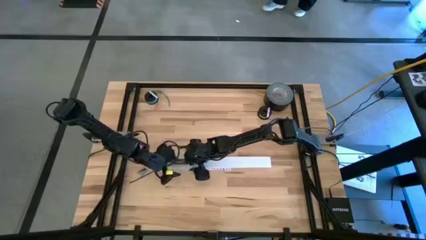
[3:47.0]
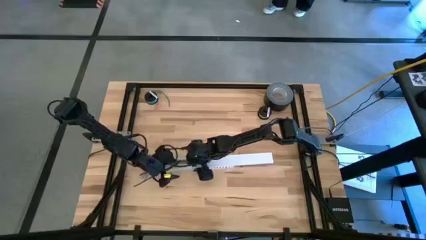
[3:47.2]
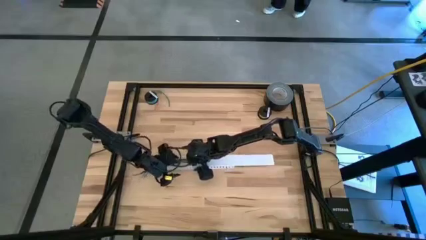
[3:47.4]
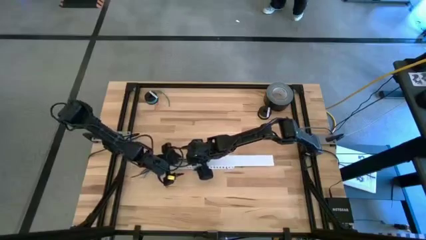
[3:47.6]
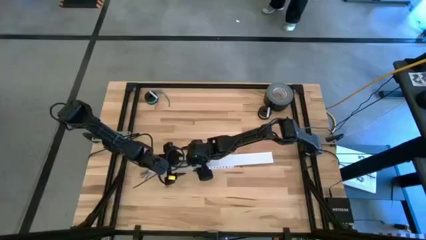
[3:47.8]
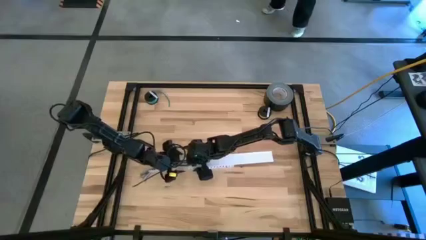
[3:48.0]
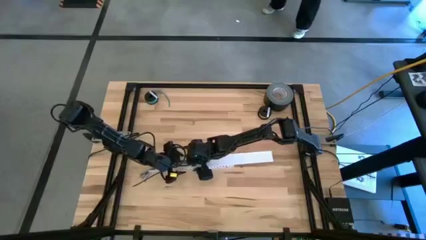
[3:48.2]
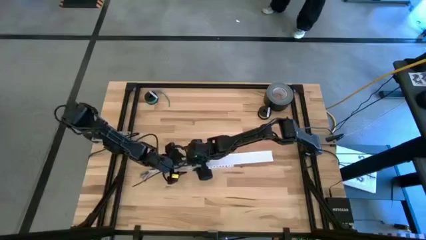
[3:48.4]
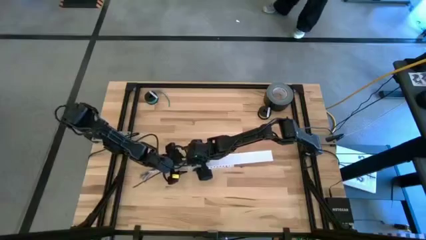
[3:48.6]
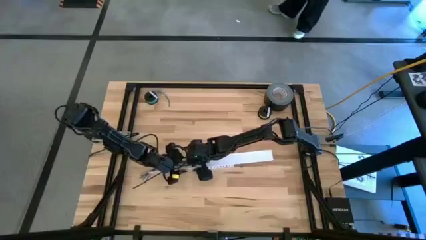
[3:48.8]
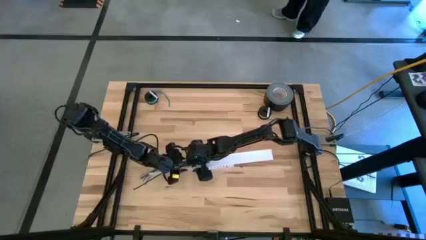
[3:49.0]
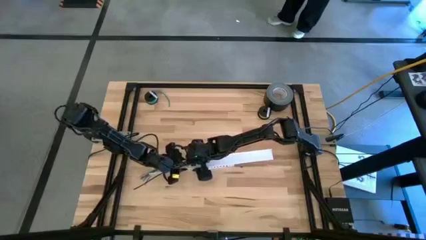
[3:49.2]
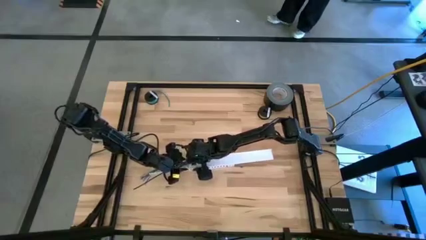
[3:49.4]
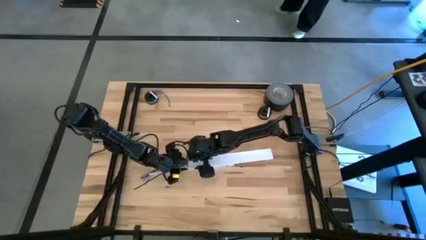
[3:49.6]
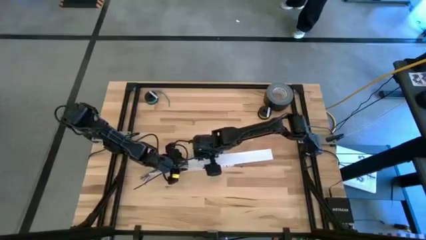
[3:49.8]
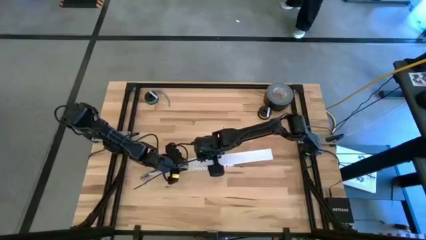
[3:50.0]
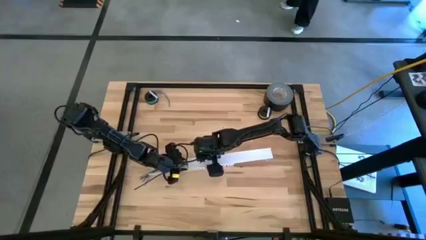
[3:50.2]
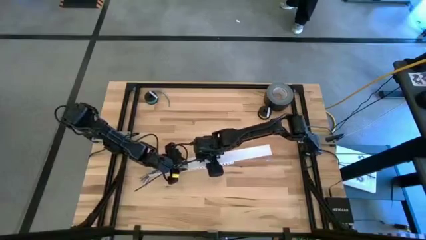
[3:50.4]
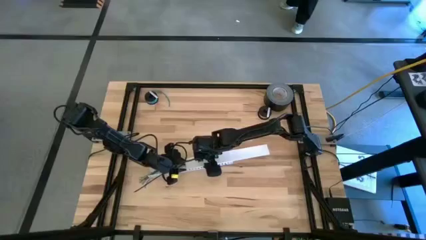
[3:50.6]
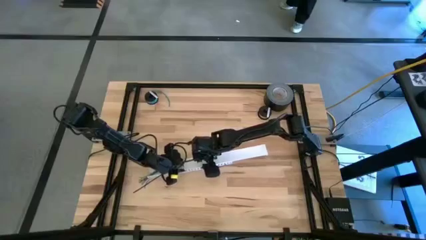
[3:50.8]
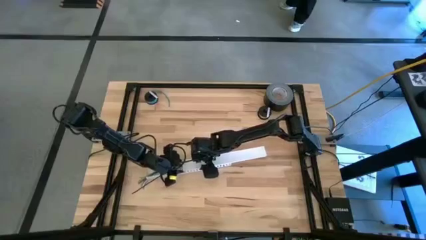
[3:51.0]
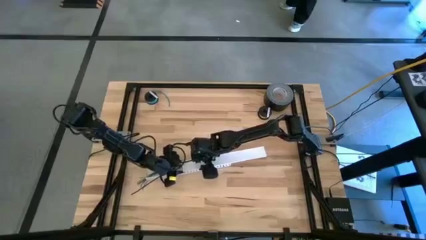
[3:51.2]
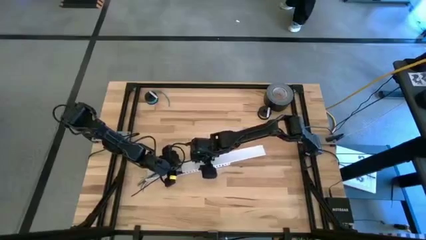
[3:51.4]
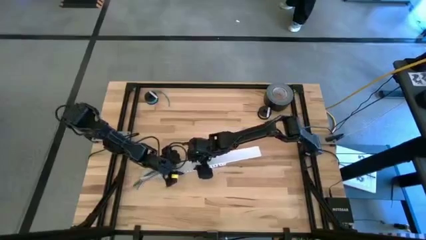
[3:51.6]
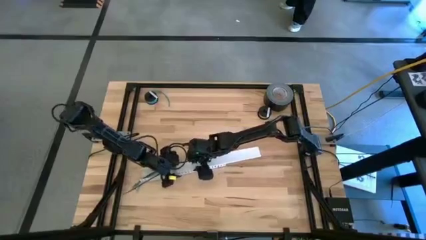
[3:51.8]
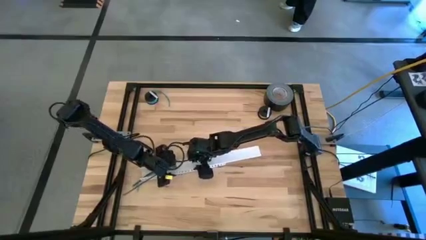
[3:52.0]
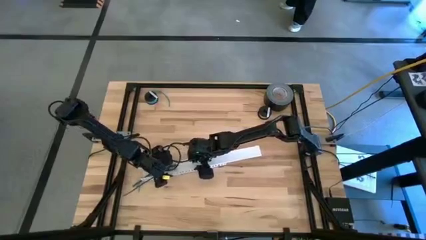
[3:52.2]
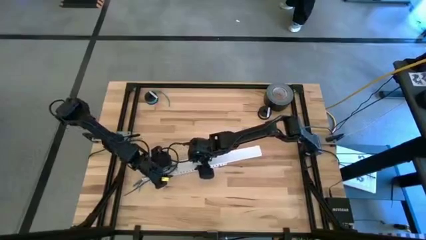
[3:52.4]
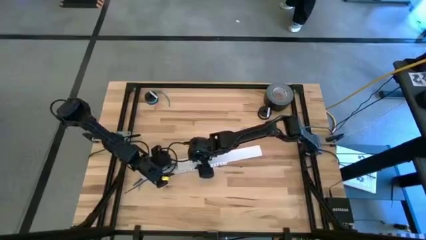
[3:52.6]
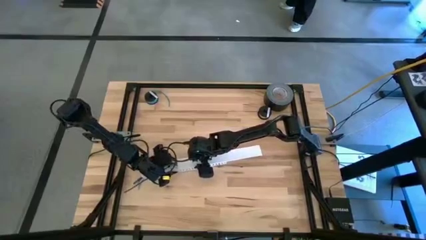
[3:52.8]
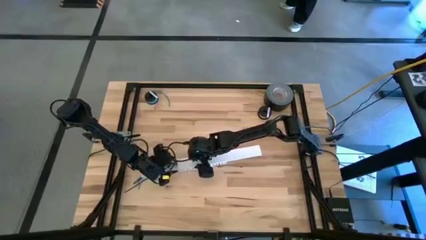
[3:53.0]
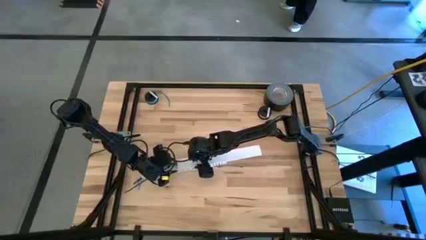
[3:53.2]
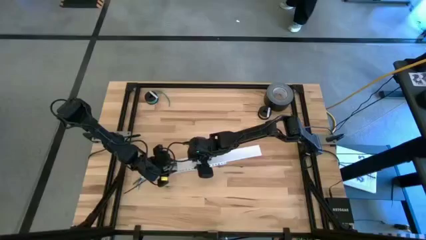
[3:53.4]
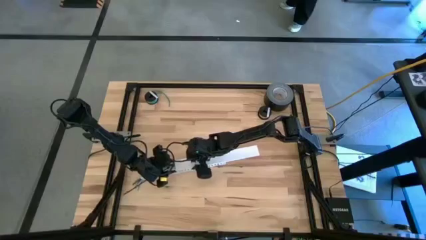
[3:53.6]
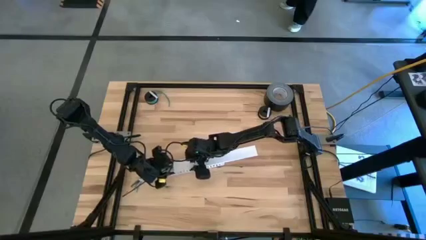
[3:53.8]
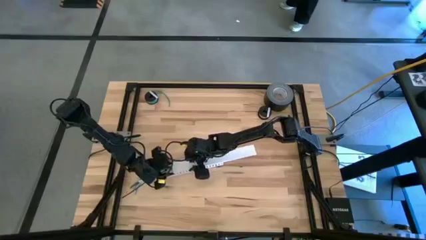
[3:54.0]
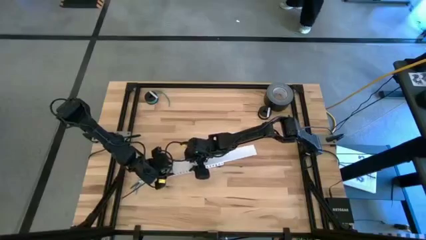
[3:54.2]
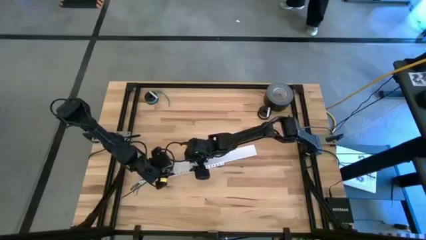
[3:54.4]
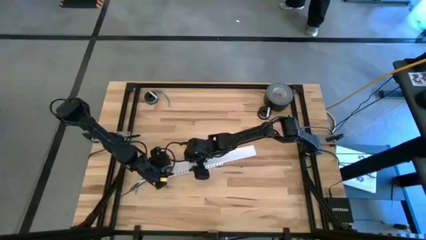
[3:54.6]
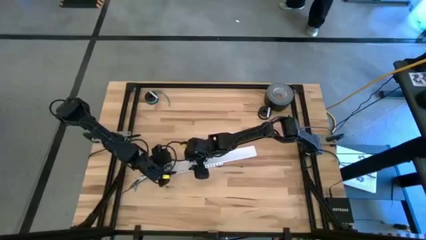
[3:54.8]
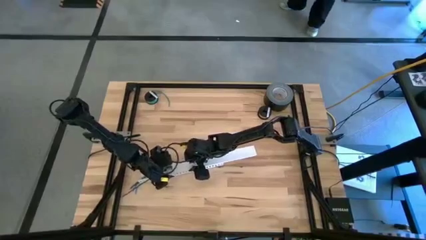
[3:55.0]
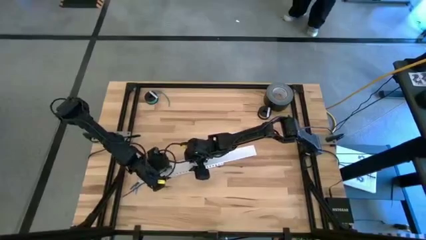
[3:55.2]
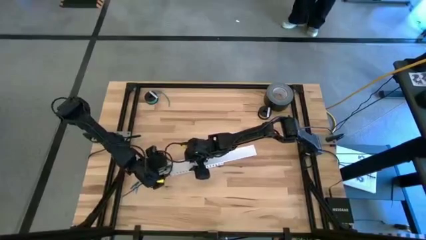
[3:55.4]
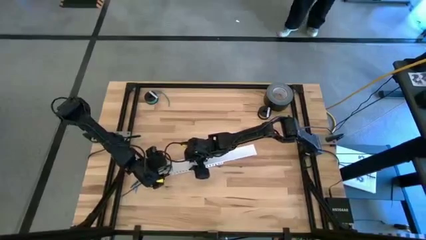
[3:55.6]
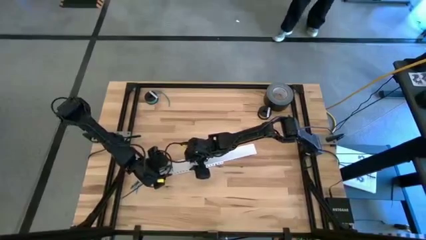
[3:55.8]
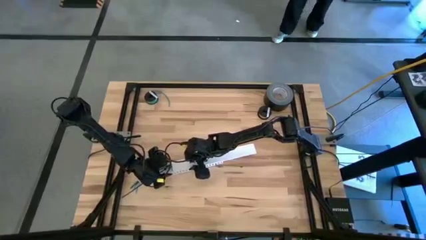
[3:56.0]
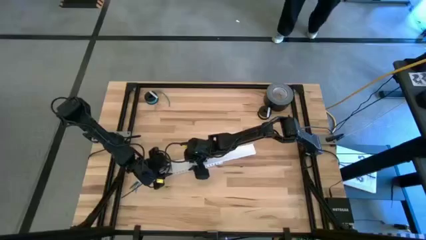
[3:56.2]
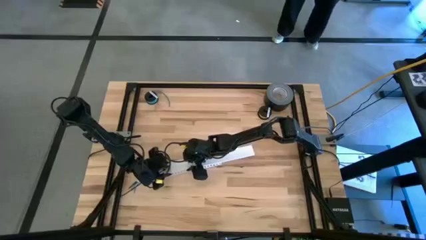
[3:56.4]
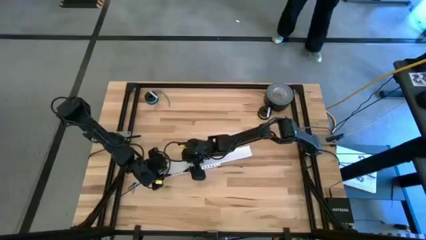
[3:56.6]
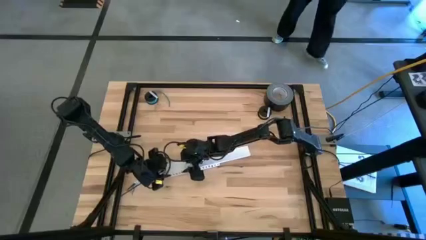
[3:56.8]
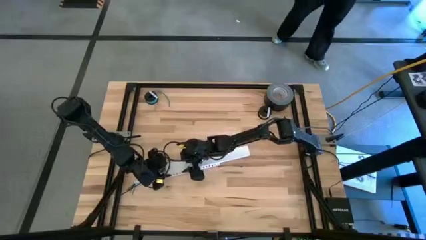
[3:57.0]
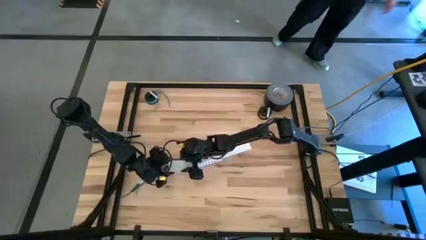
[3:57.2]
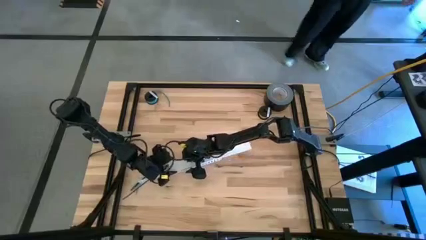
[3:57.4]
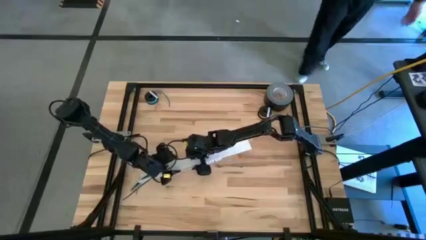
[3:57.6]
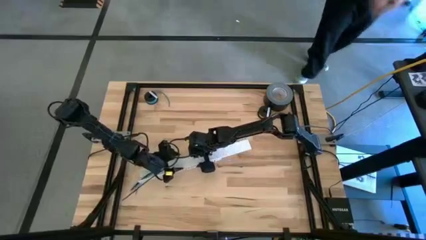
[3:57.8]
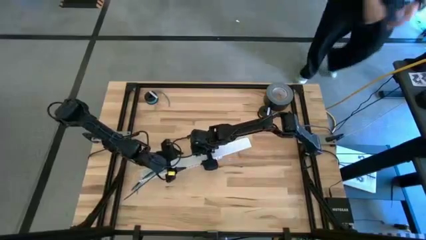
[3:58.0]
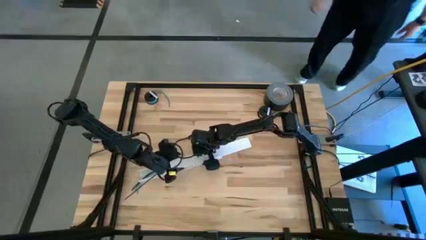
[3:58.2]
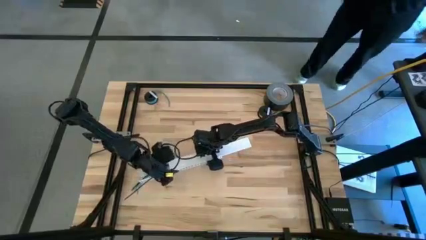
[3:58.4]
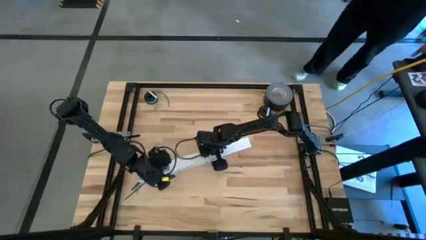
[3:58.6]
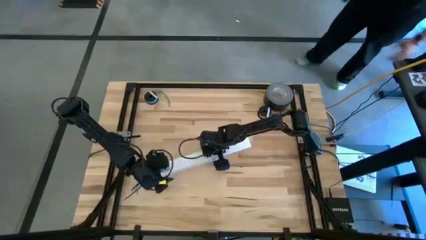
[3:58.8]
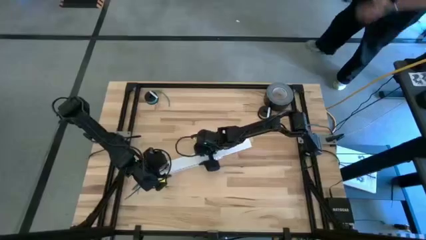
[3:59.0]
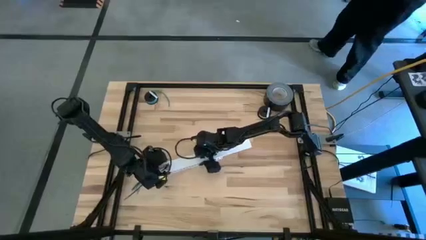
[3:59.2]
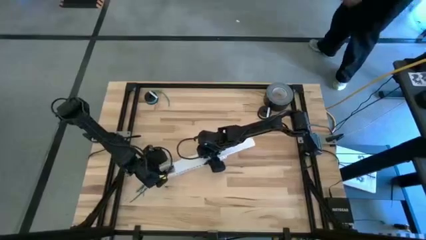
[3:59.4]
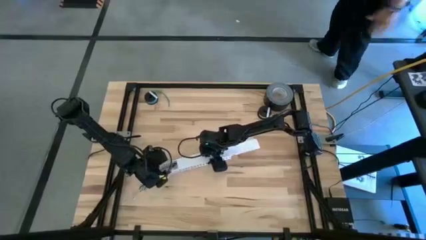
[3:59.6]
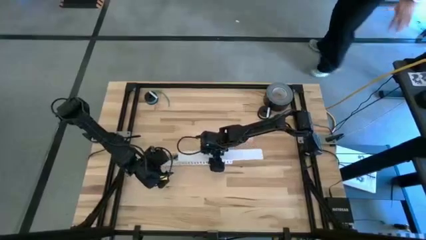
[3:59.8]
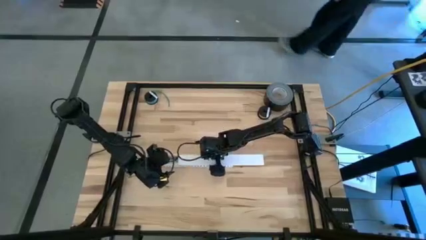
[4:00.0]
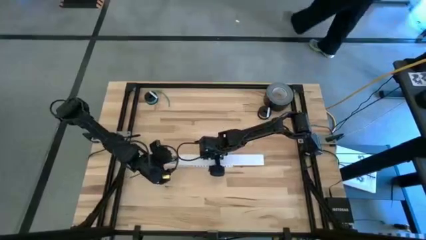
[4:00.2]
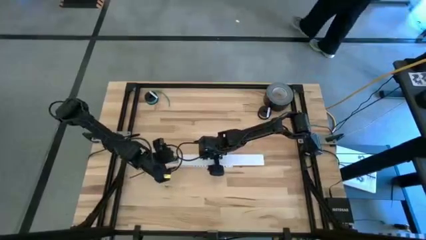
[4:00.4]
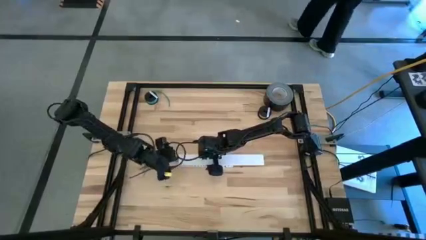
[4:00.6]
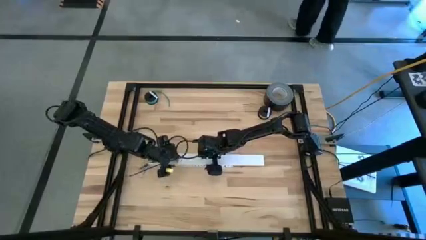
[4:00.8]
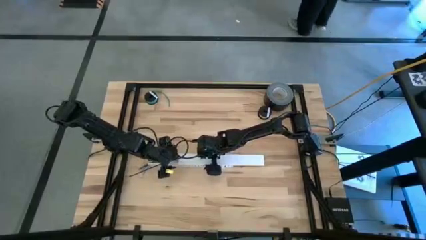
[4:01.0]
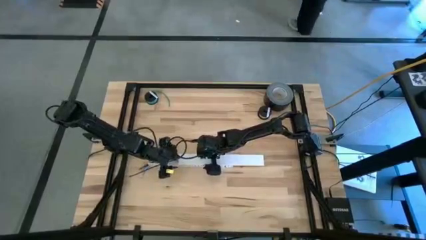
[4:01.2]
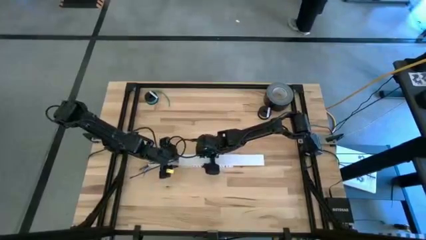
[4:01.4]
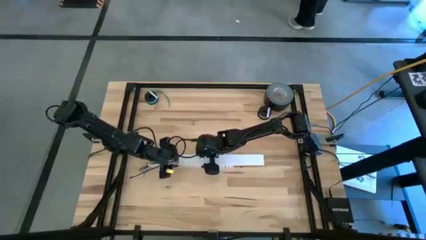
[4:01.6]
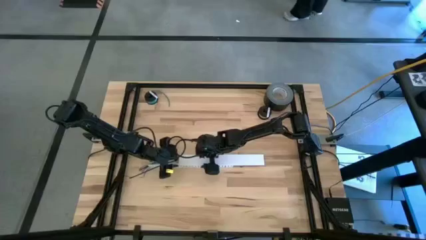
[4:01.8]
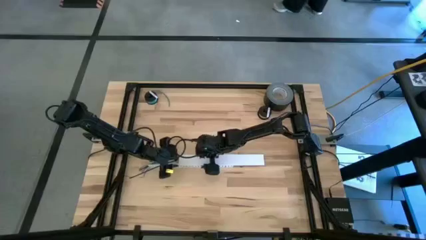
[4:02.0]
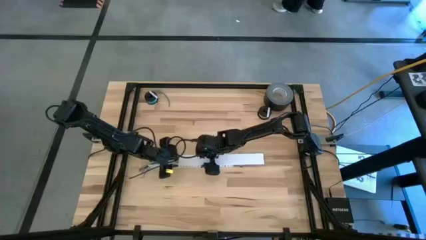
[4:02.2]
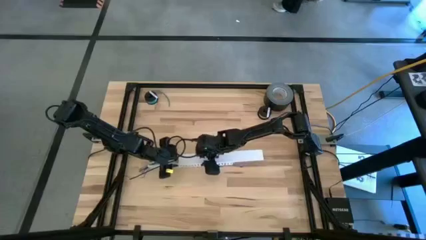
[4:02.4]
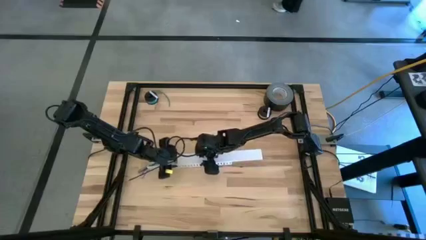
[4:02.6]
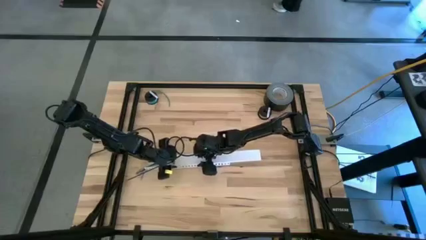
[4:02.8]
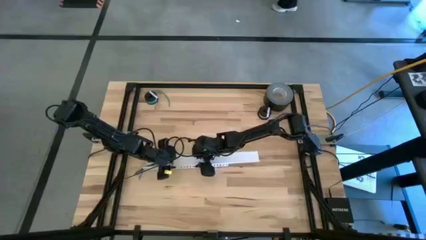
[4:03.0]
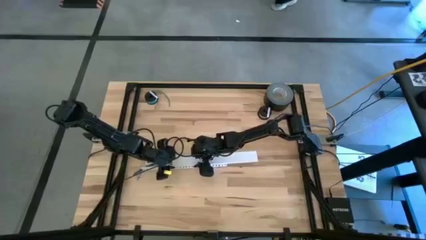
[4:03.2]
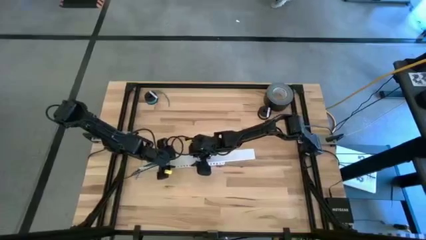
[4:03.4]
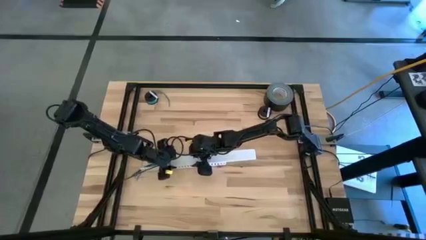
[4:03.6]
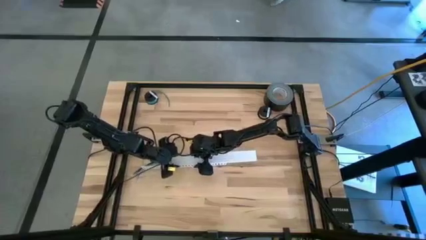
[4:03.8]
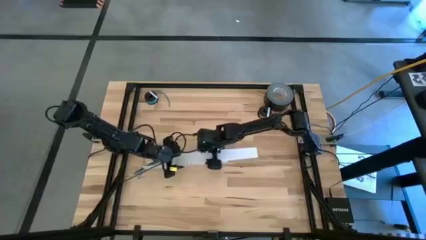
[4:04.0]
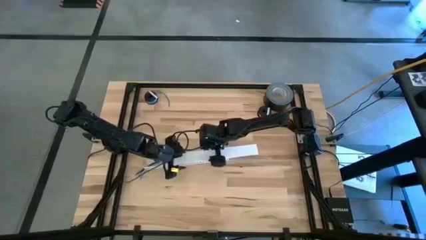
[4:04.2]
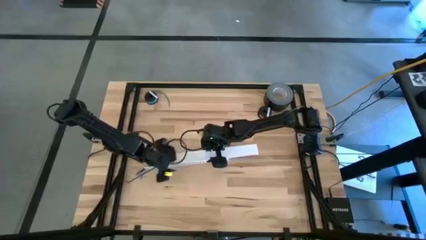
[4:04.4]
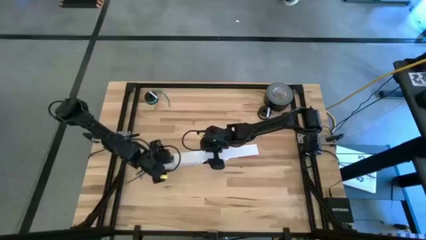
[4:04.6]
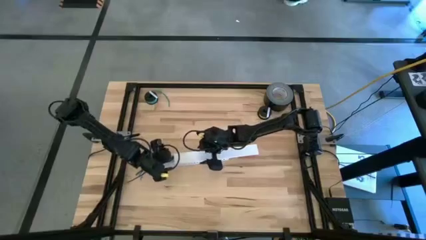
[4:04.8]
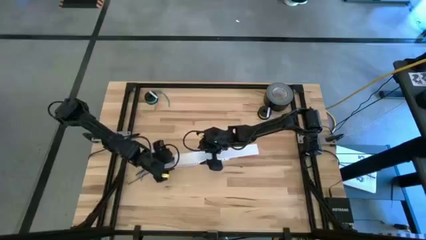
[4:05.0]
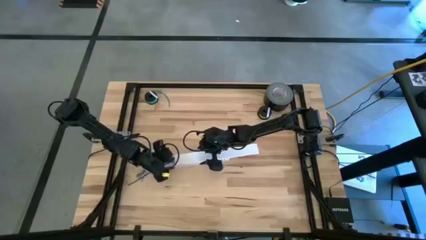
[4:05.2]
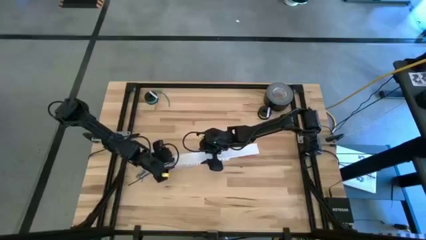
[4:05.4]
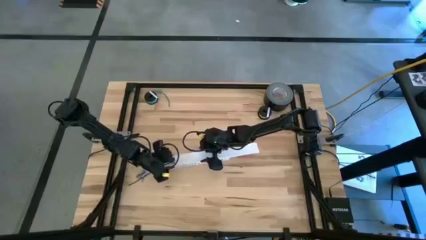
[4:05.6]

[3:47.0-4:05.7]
Task: Ziptie cables
Close the white cable duct
